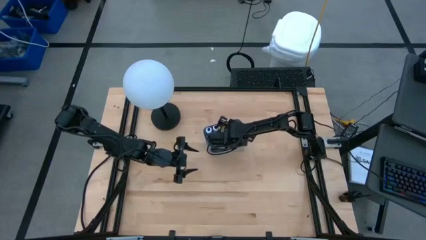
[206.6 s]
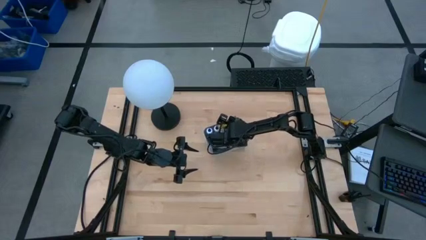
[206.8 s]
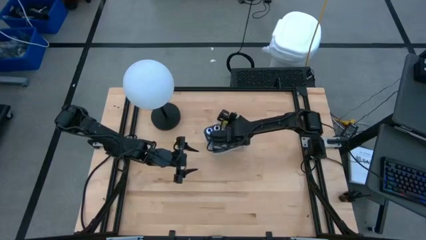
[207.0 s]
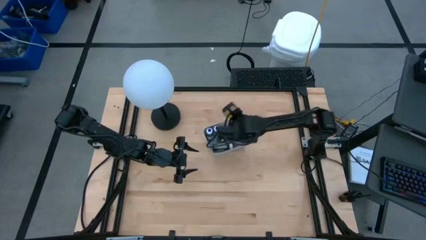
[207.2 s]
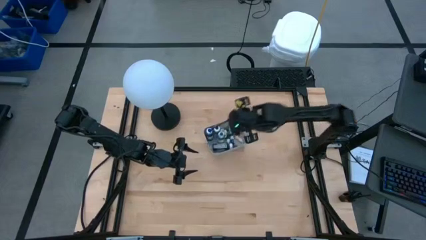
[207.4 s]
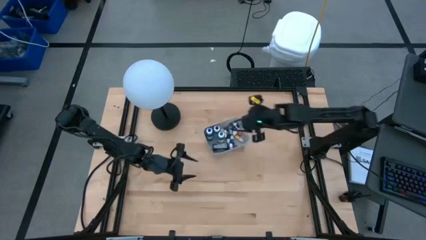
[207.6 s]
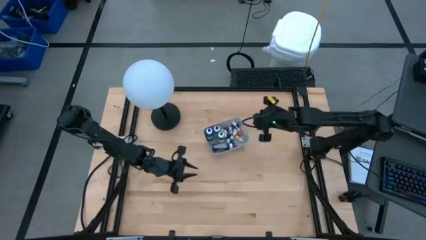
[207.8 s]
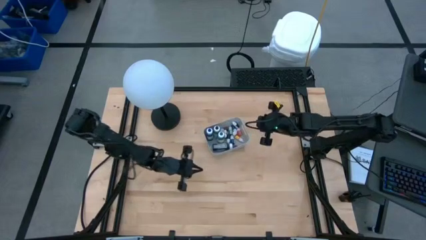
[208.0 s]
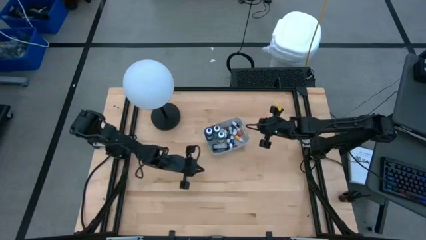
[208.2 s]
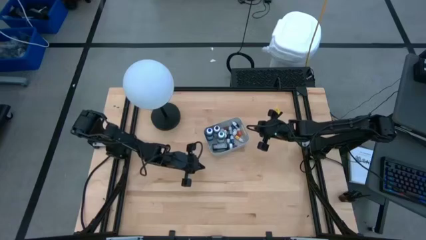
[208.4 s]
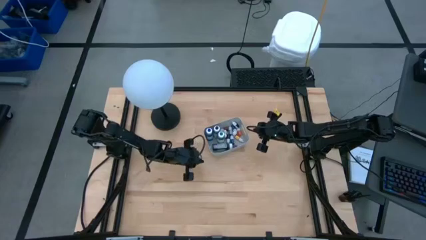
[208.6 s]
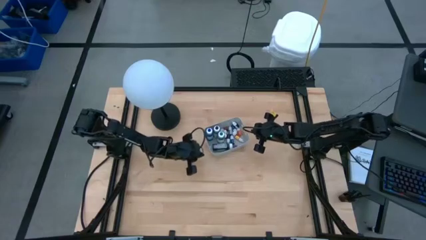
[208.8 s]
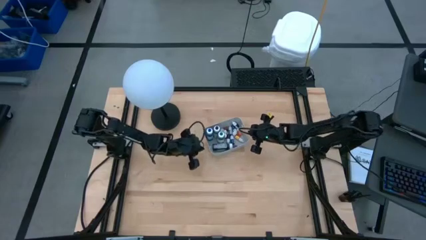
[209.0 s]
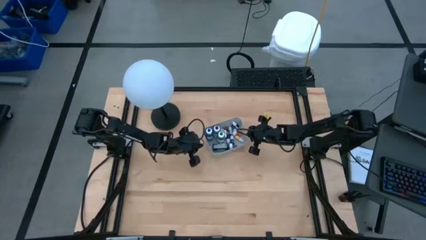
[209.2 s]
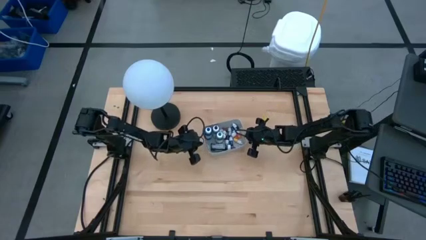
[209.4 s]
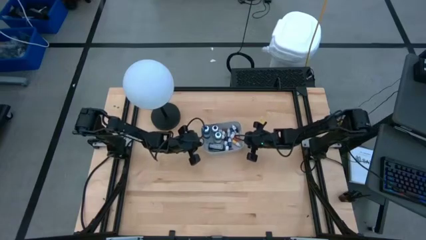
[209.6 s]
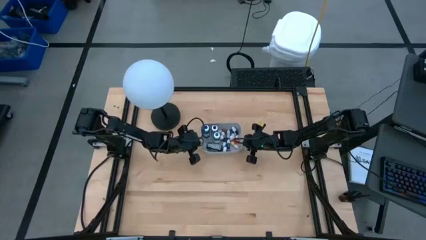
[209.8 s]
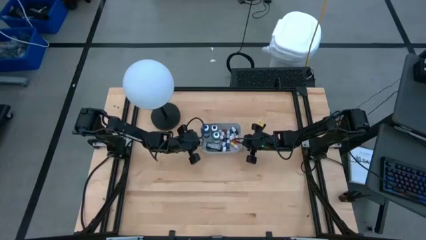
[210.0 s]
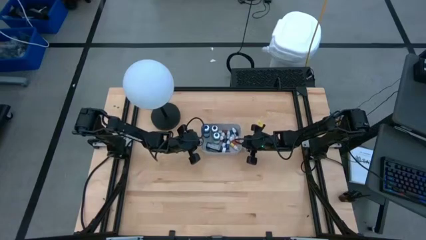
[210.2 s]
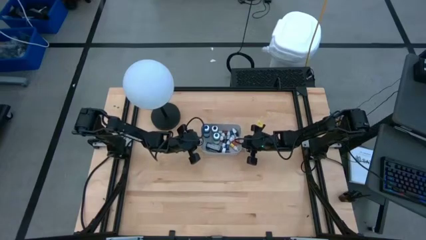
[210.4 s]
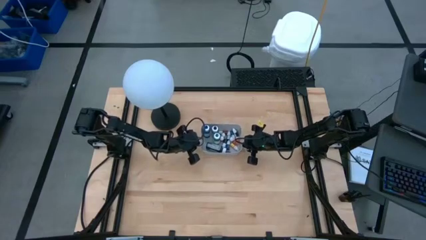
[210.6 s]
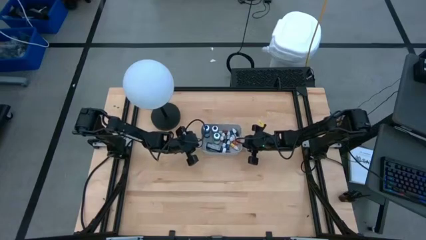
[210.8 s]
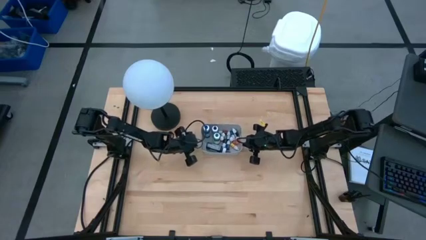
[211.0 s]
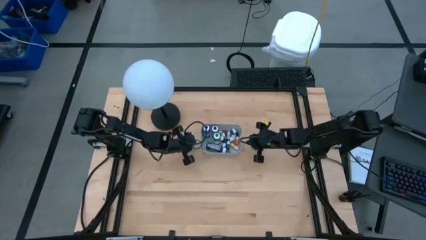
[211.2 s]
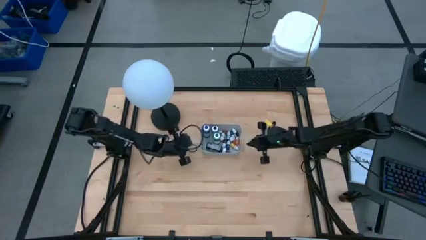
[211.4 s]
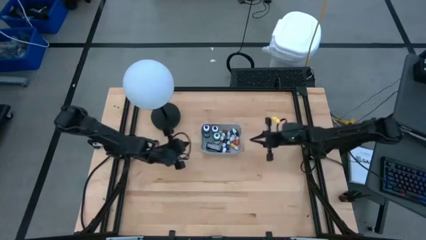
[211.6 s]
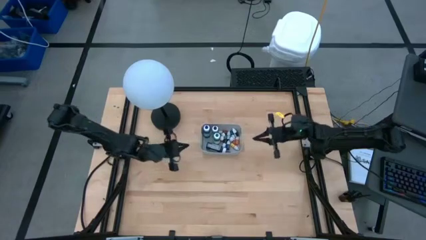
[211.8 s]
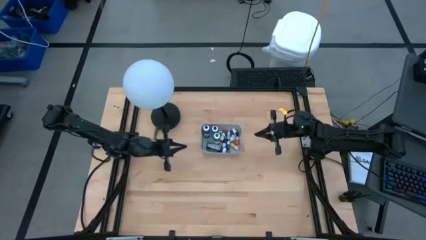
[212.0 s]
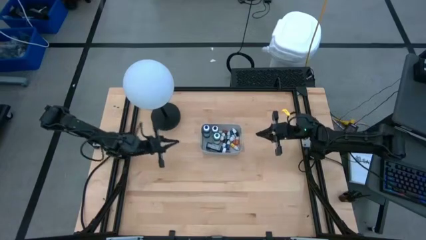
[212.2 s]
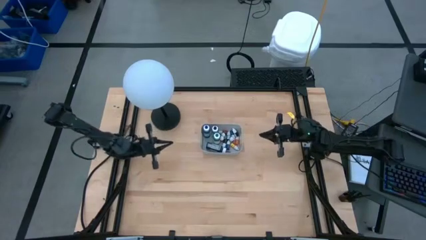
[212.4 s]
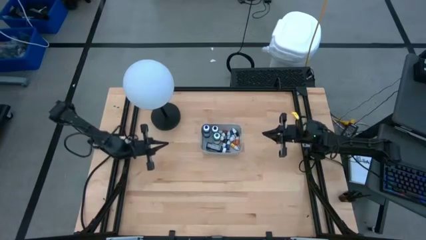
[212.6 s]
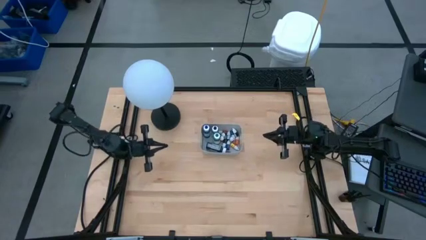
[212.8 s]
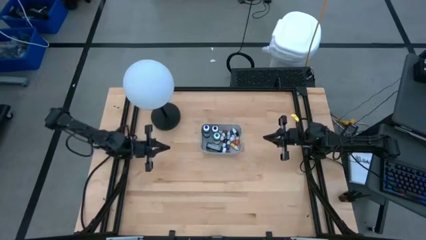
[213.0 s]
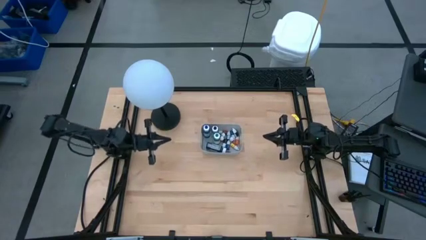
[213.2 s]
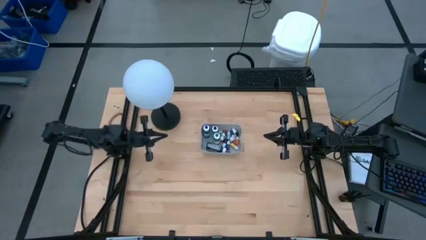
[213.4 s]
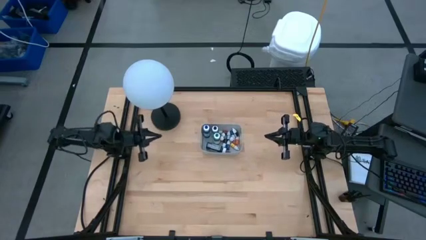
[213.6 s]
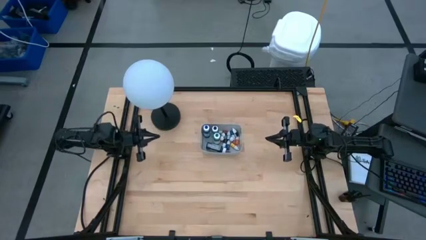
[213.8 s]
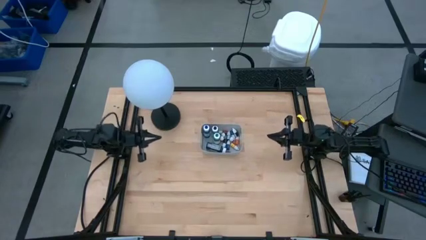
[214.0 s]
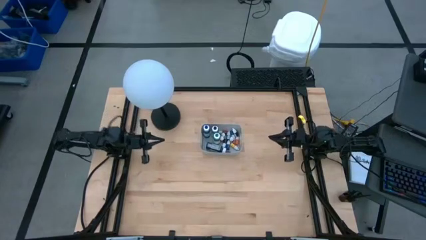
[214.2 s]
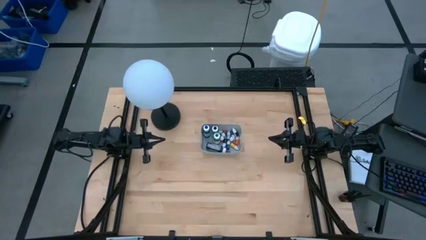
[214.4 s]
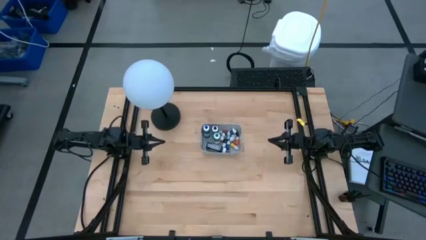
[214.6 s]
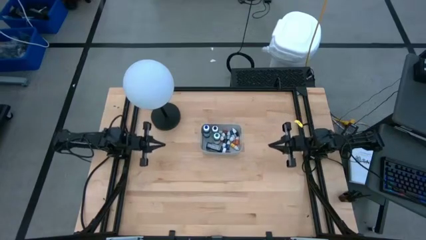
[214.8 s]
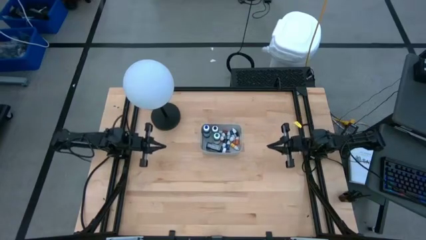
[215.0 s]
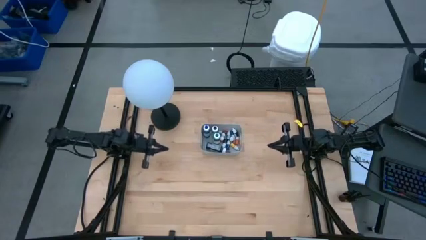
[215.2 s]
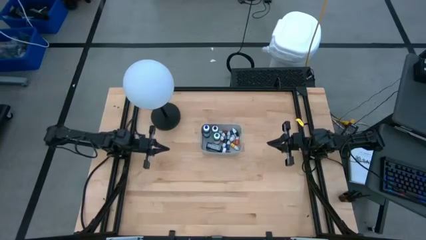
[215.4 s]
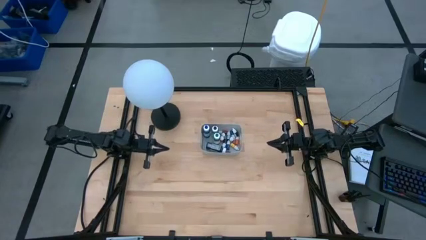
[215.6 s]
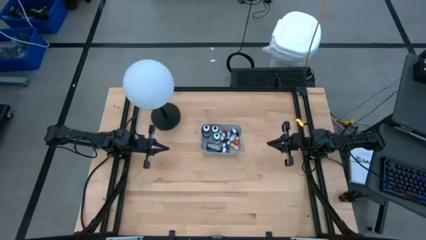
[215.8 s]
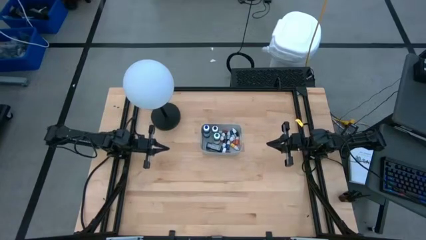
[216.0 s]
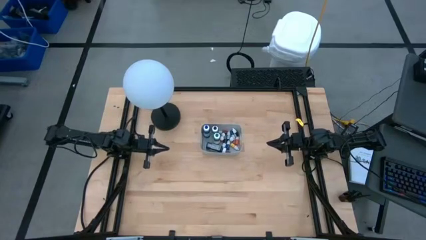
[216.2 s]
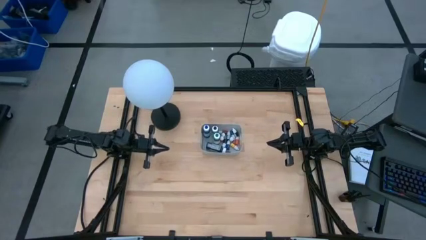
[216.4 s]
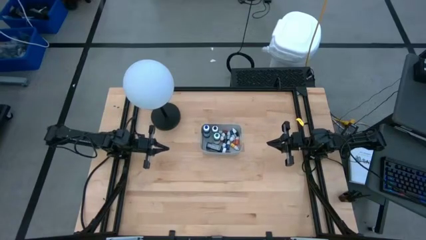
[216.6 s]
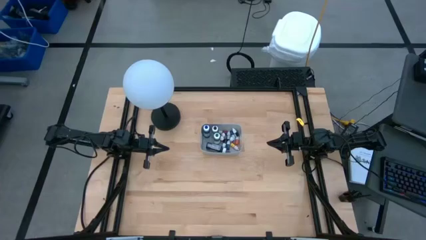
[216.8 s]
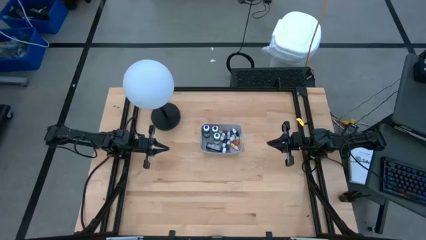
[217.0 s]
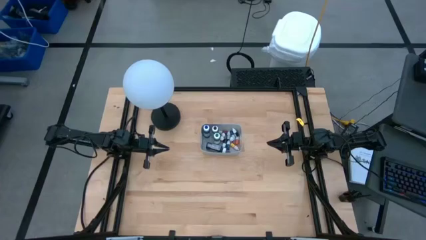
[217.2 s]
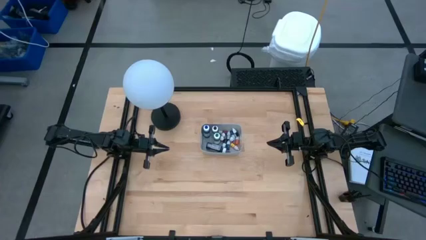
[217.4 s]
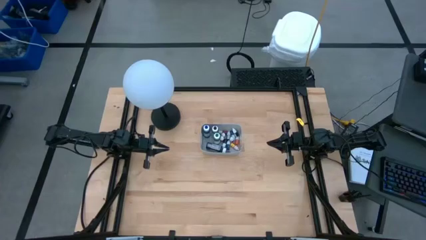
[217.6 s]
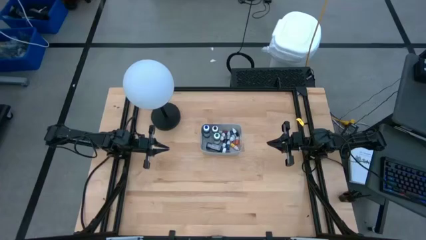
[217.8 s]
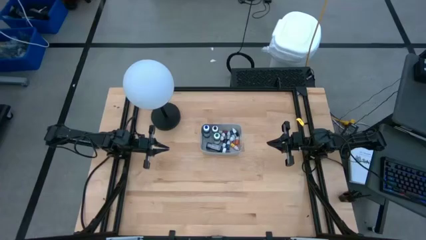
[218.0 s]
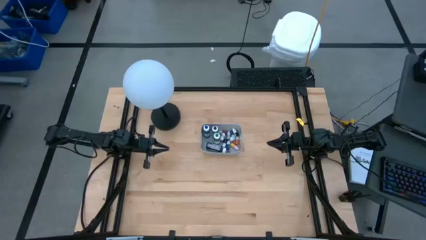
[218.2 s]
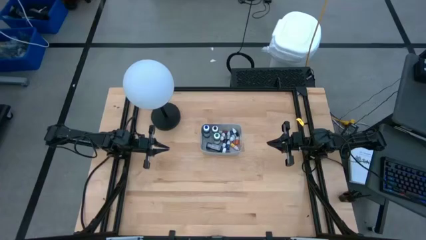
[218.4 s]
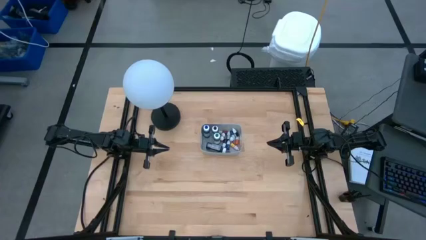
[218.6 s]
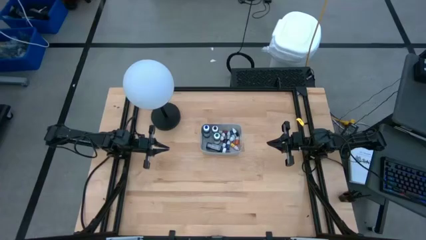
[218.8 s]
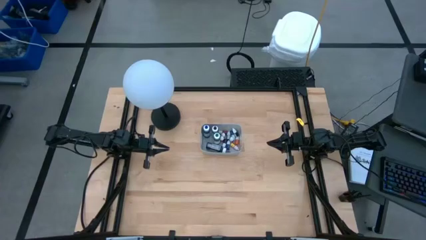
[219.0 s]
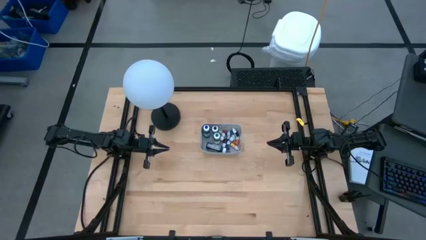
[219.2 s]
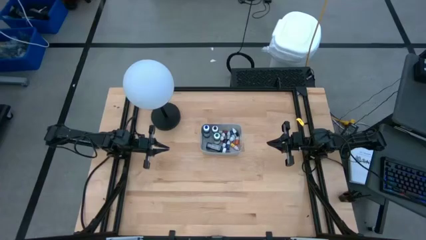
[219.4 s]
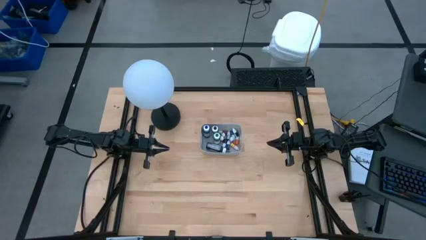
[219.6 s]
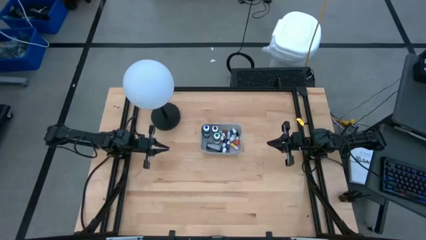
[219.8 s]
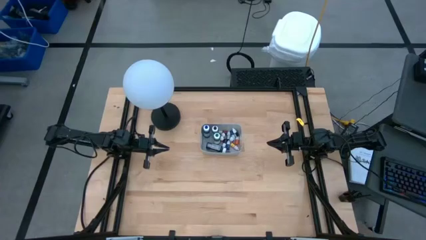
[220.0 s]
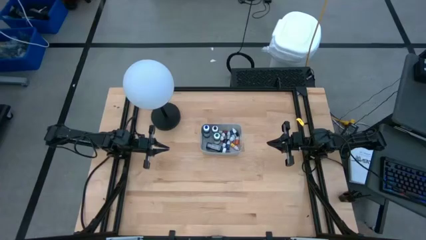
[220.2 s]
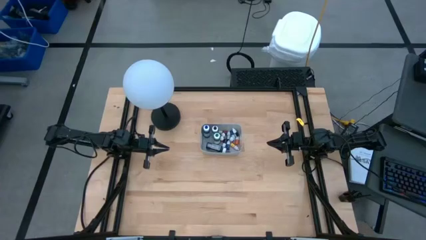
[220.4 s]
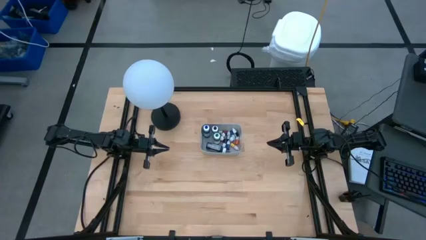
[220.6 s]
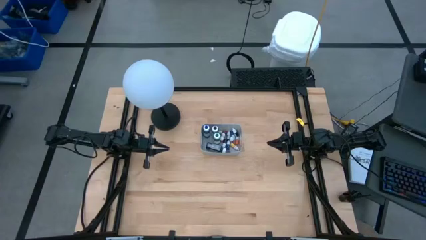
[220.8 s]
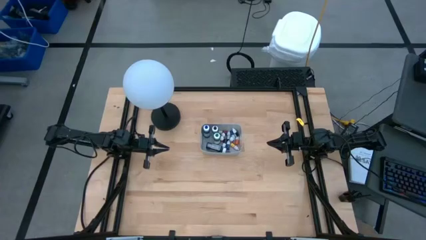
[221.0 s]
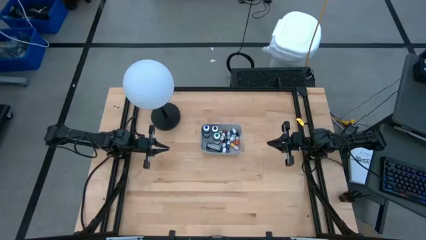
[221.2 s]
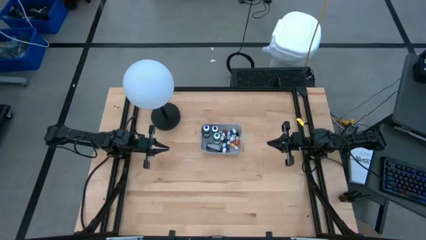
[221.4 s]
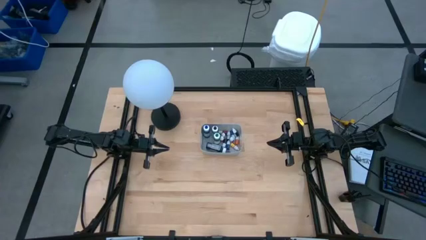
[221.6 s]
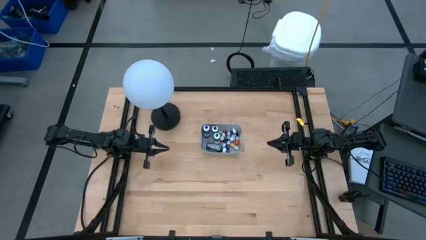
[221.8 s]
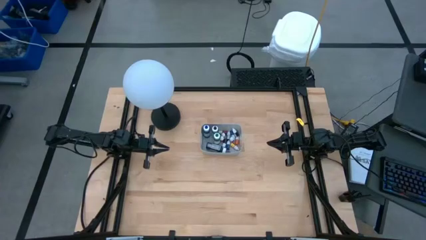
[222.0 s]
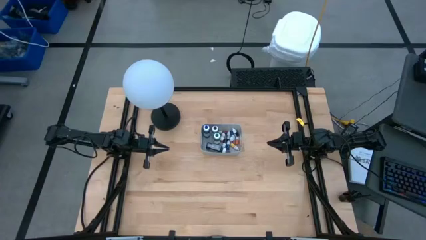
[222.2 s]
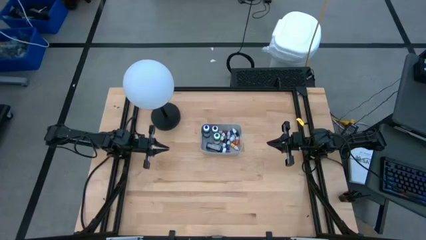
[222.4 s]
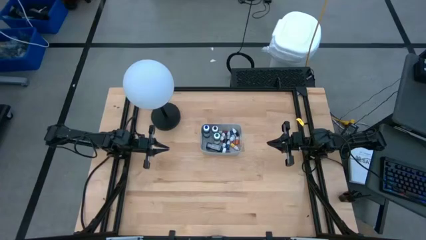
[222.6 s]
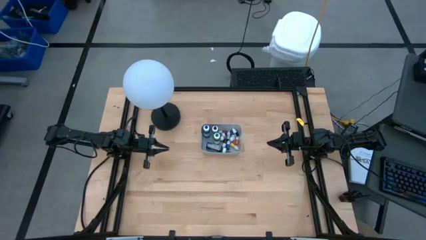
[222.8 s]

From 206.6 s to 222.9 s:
Task: Pick & Place food coloring
Return to Home Position
